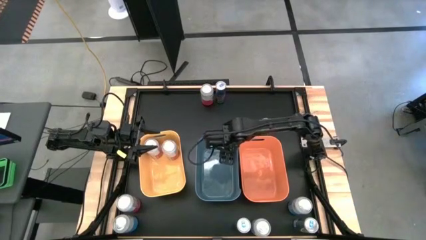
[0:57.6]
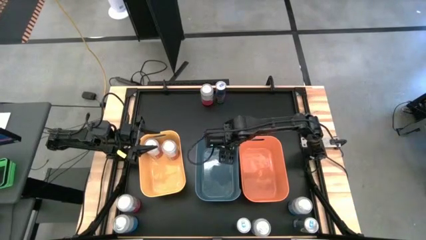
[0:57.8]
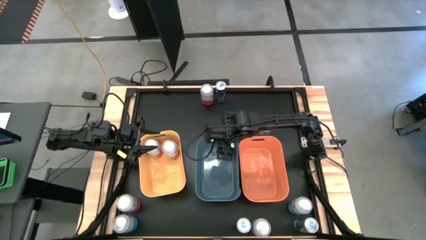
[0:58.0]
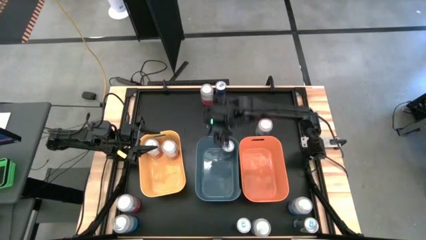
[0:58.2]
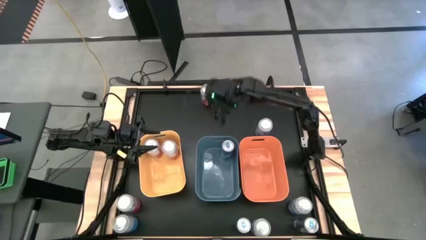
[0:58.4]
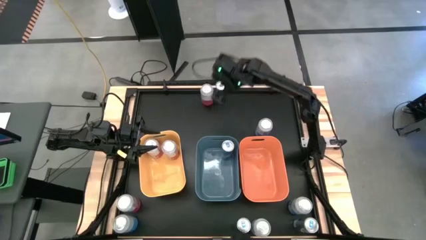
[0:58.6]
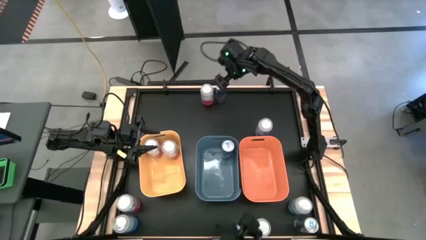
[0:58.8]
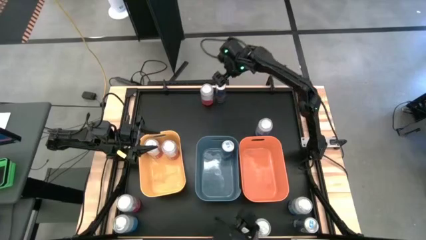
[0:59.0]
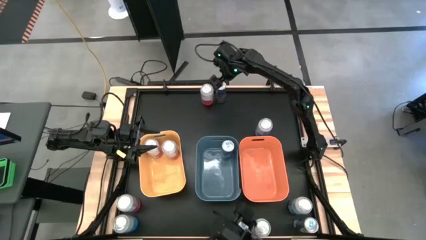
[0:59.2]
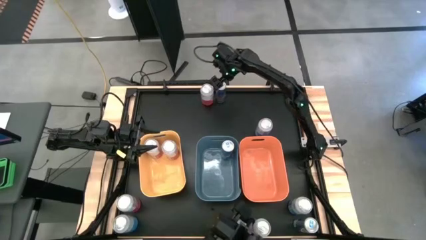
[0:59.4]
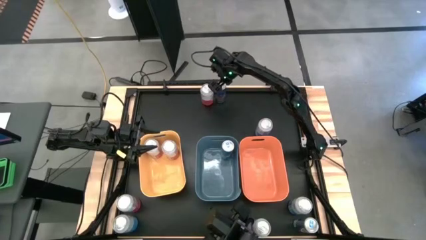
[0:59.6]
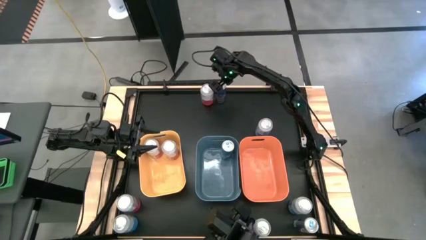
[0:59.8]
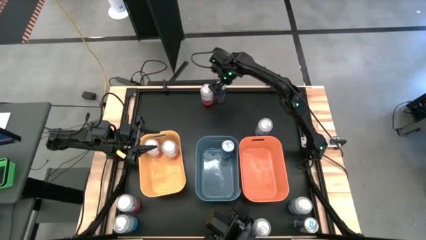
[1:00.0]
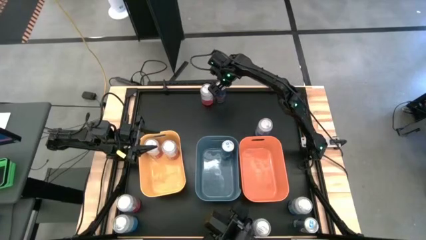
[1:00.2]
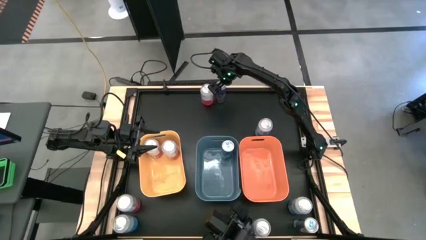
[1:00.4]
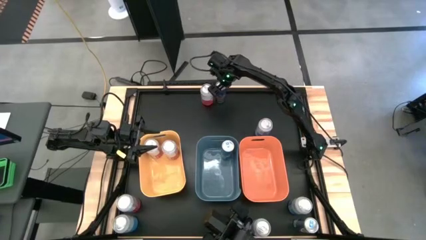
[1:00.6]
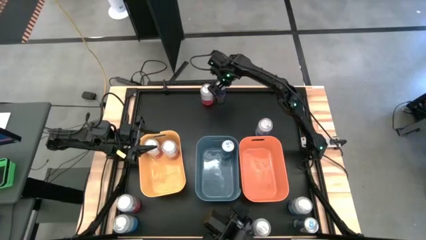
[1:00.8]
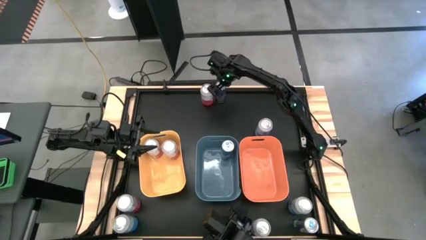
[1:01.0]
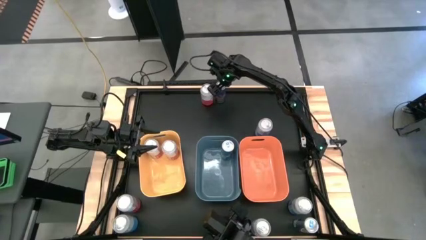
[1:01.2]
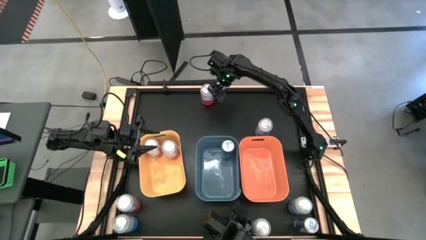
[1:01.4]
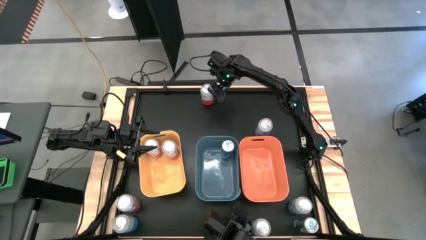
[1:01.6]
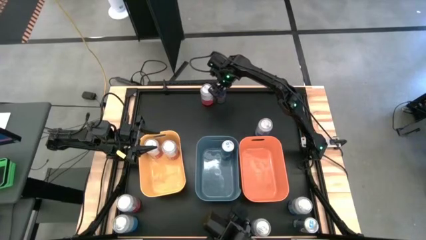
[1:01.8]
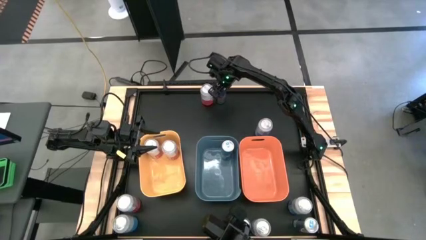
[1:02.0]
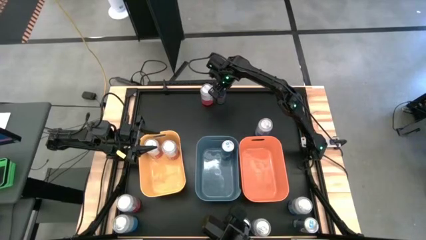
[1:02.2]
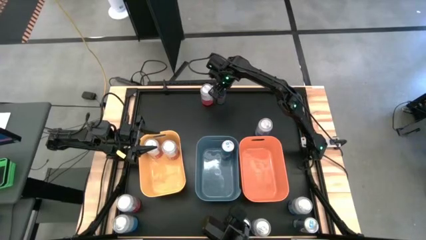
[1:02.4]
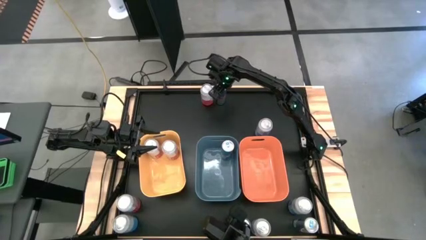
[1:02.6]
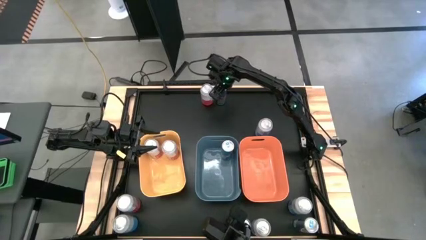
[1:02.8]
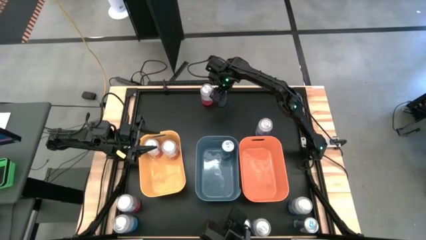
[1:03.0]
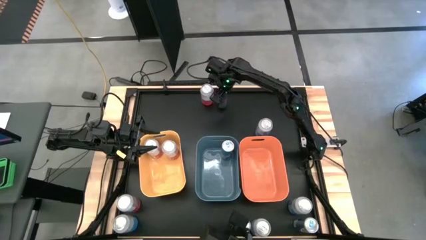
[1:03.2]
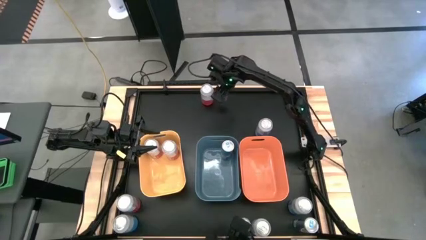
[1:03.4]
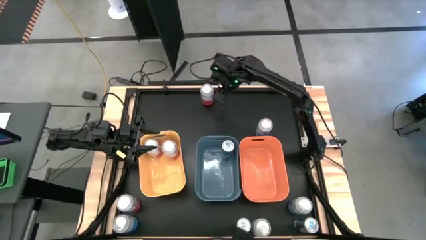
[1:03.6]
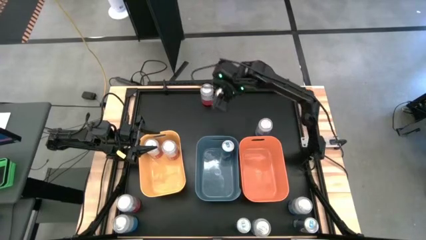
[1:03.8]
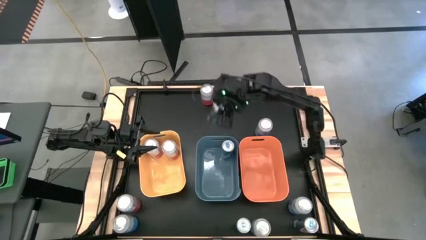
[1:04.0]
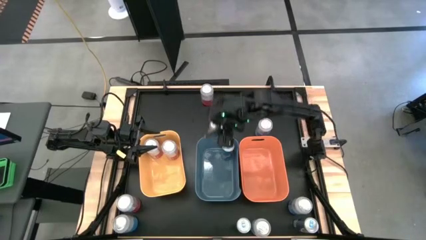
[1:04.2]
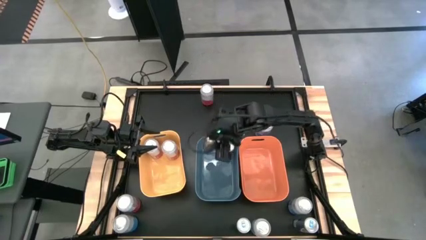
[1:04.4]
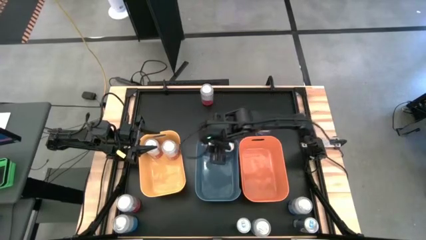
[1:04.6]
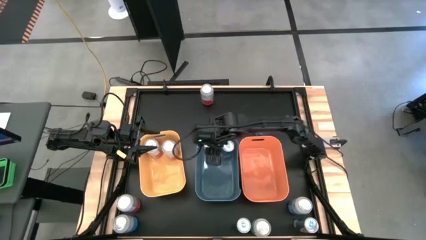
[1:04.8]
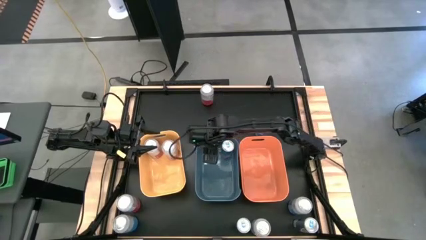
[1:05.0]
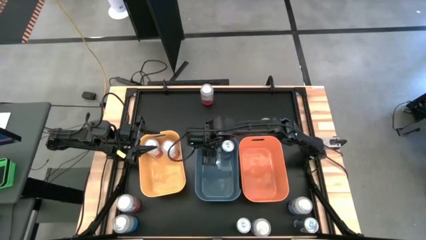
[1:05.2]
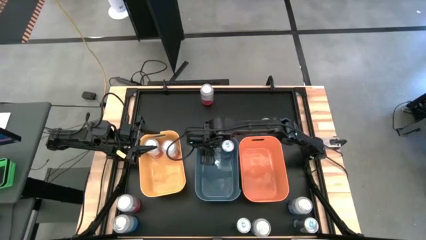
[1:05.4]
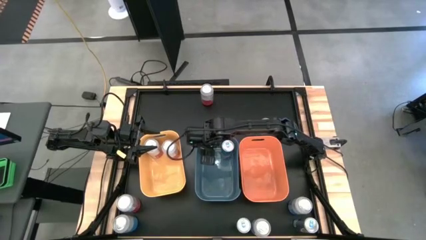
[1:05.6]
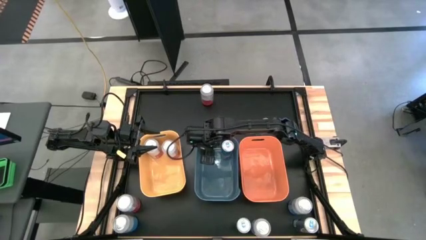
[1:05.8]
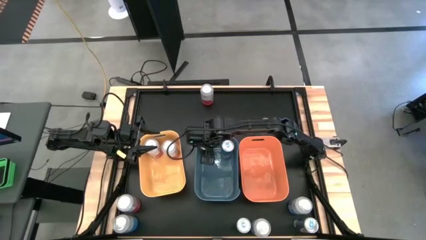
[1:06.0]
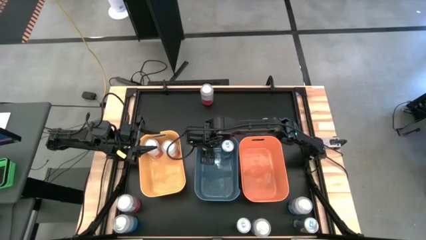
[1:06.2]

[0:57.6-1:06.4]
Task: Sort soda cans
Put the top blue soda can into the blue bin

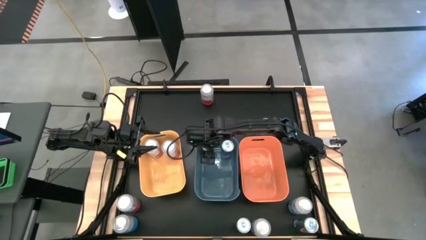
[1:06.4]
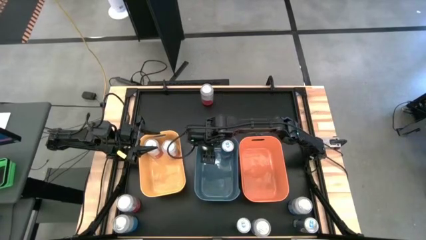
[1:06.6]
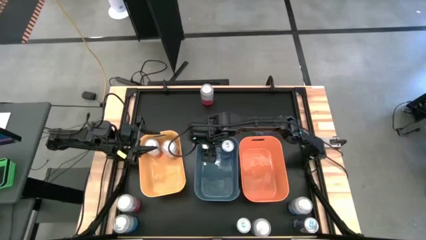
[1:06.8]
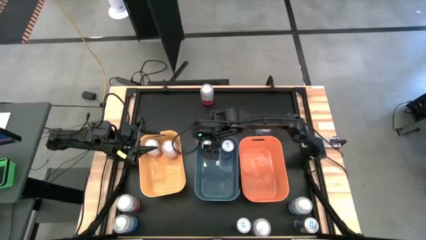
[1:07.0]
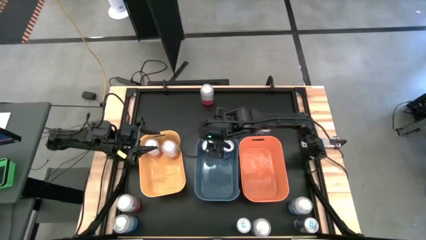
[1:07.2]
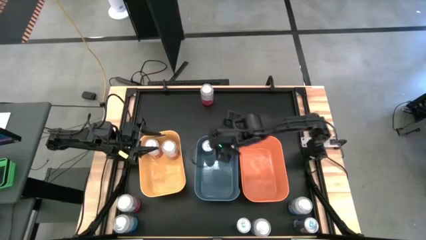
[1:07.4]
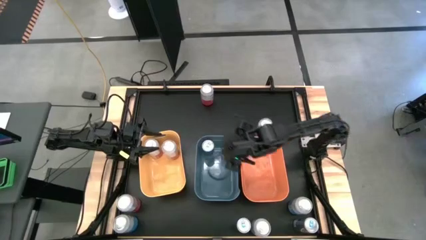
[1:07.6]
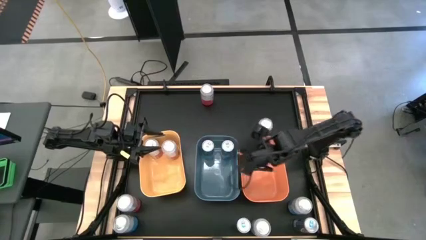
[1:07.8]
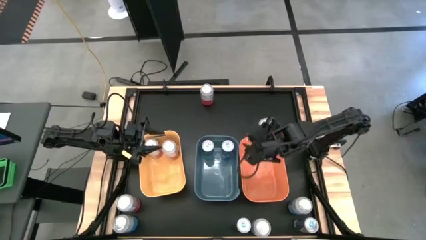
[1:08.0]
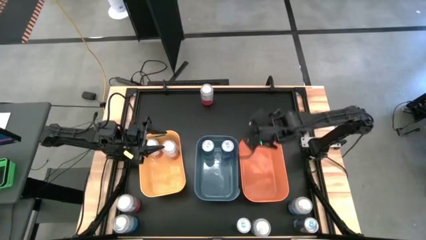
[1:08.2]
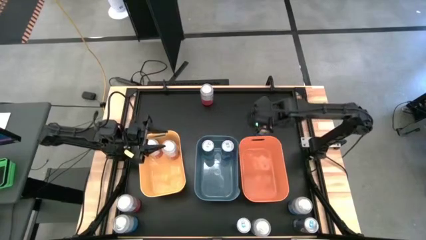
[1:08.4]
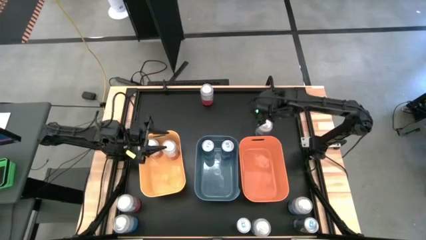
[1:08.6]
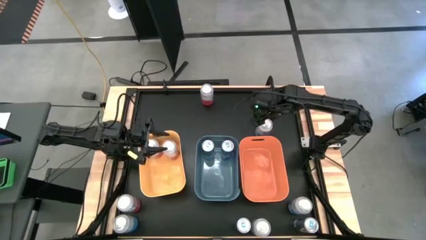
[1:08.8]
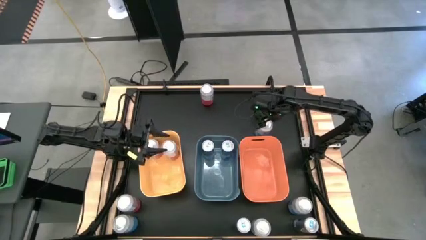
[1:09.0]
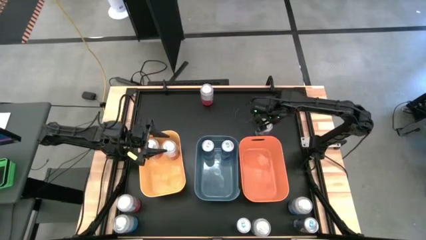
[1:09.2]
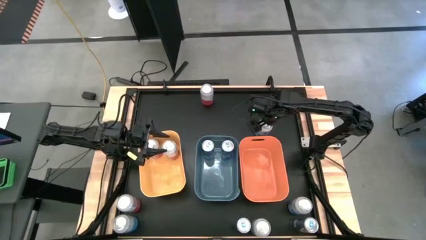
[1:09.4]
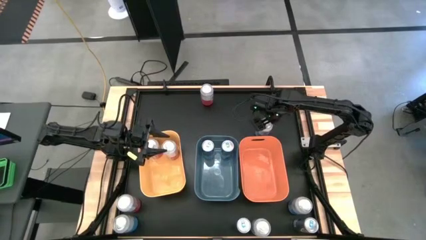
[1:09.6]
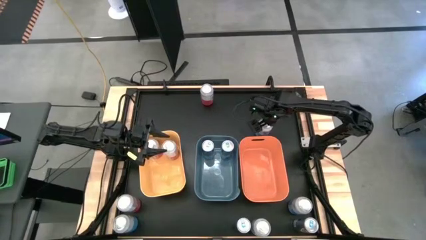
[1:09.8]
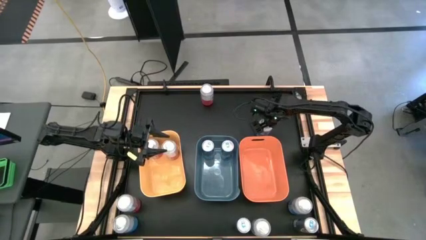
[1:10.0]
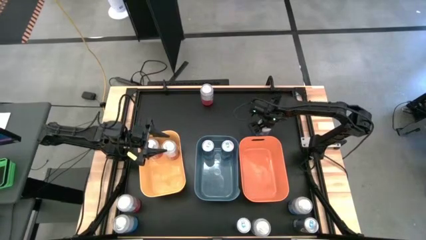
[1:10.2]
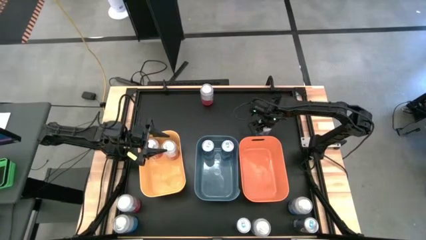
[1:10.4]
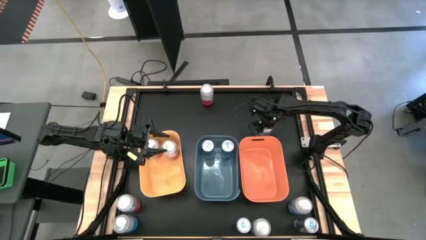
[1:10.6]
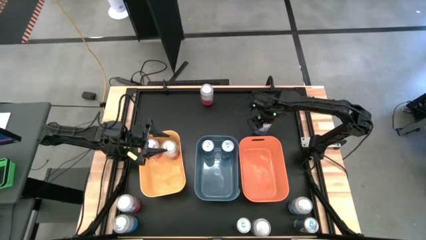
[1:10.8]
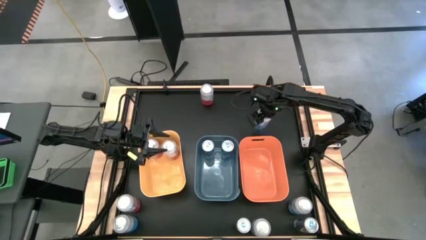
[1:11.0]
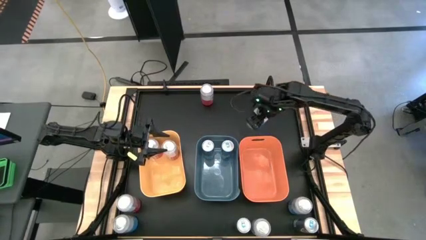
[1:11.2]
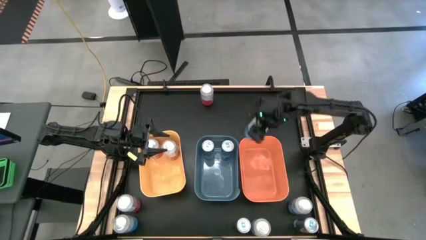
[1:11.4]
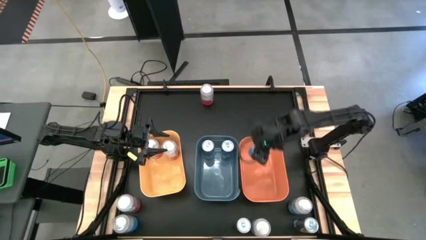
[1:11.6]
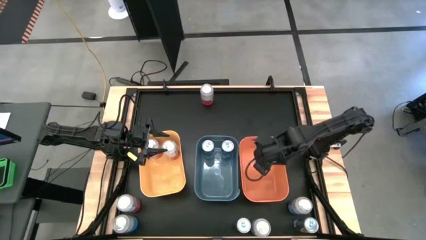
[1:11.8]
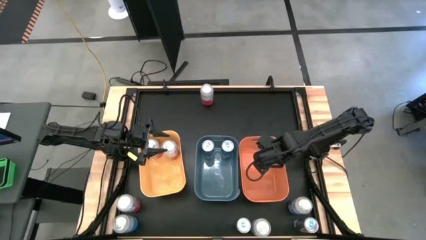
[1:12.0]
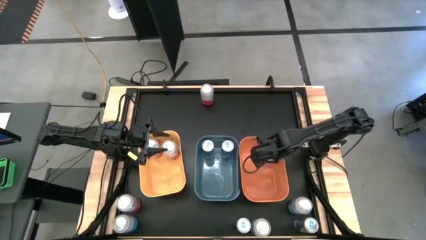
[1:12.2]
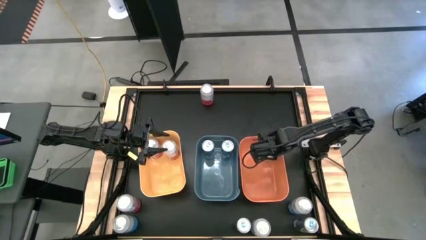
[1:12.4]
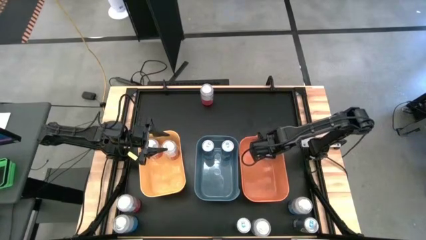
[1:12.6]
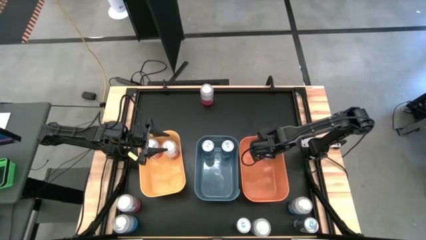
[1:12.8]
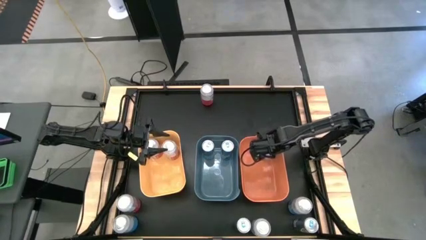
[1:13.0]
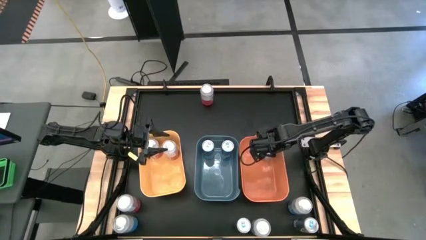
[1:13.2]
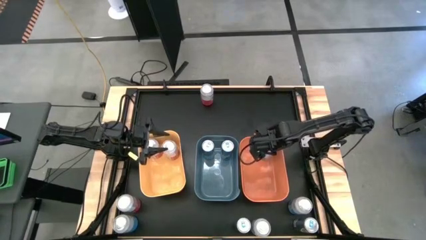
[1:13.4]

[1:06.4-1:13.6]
Put the top blue-white soda can into the orange bin
